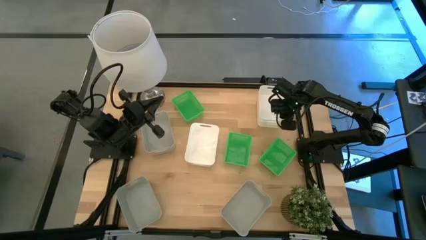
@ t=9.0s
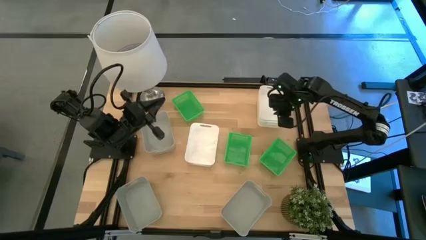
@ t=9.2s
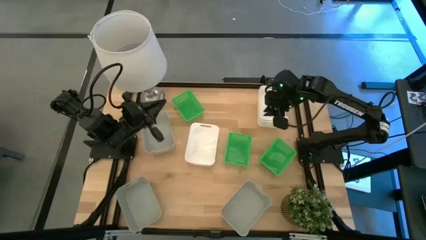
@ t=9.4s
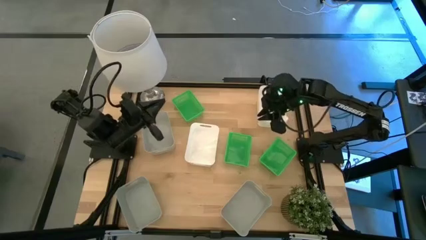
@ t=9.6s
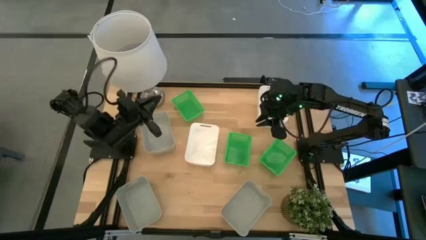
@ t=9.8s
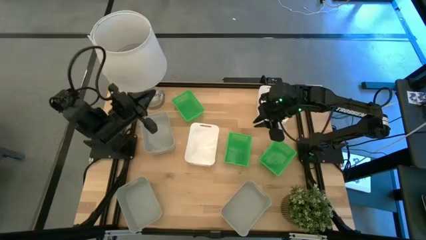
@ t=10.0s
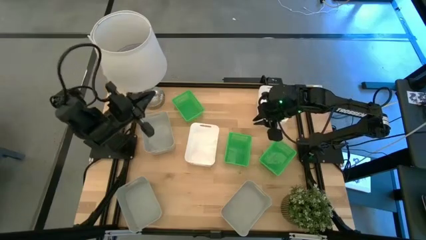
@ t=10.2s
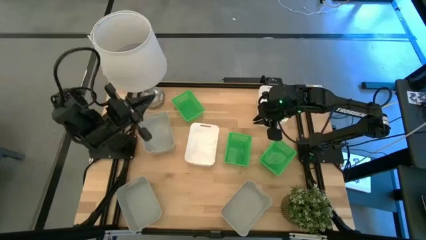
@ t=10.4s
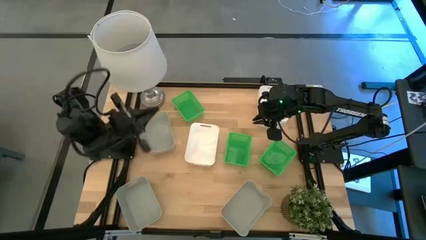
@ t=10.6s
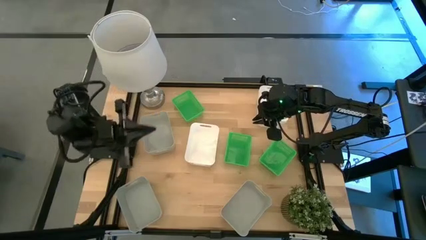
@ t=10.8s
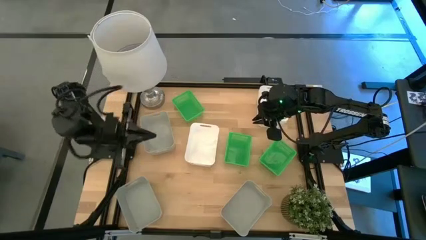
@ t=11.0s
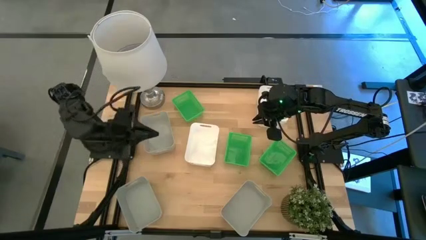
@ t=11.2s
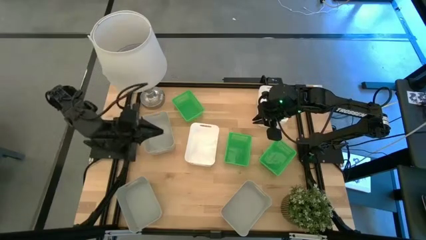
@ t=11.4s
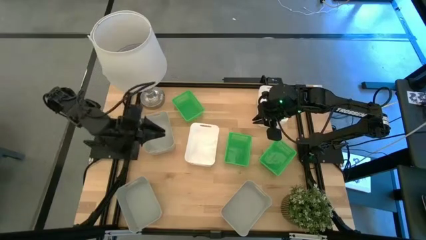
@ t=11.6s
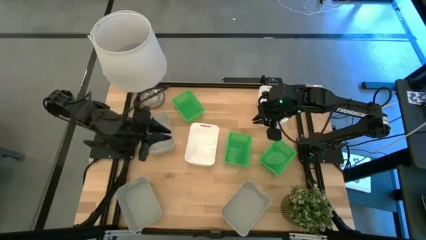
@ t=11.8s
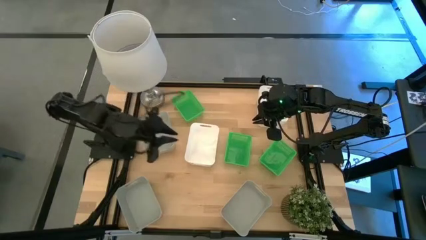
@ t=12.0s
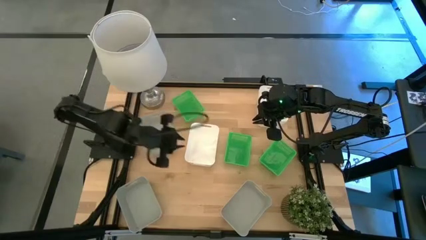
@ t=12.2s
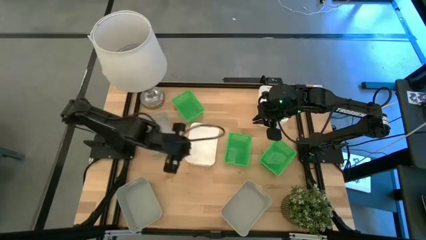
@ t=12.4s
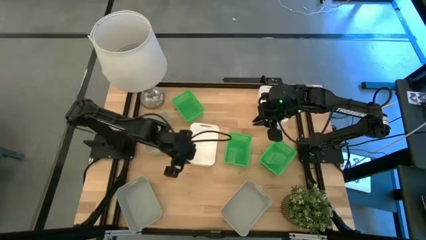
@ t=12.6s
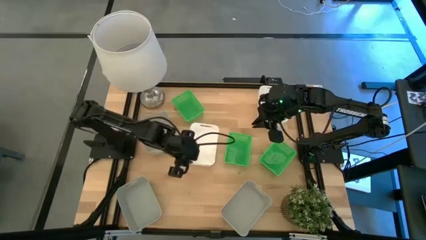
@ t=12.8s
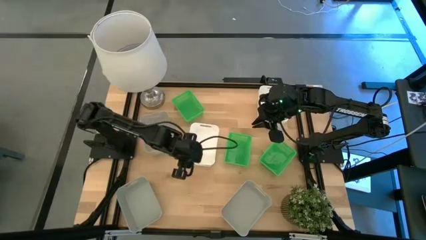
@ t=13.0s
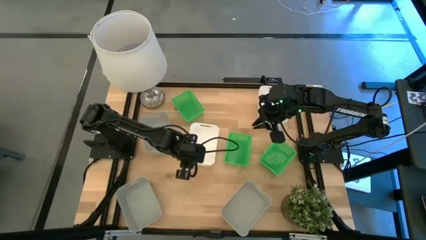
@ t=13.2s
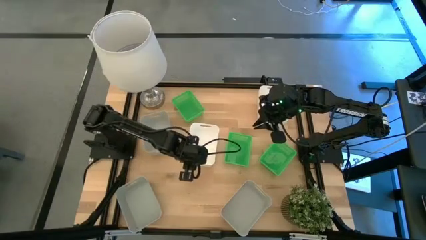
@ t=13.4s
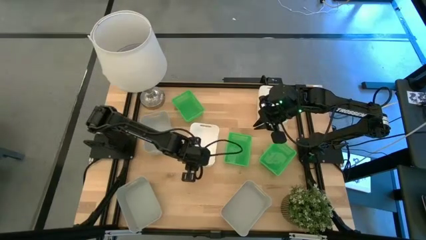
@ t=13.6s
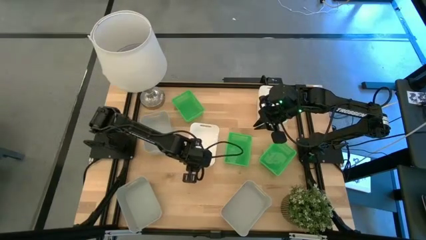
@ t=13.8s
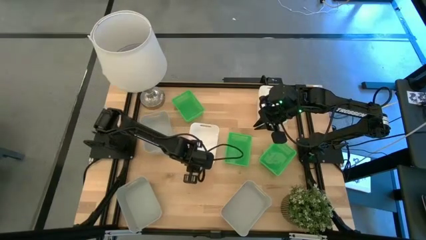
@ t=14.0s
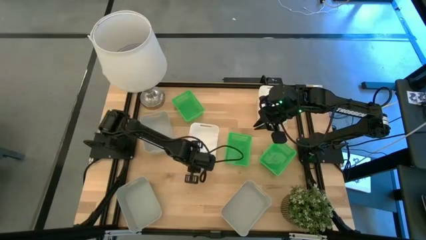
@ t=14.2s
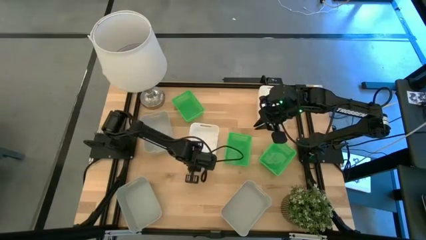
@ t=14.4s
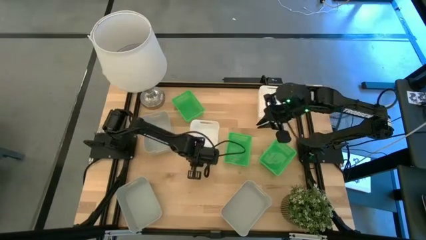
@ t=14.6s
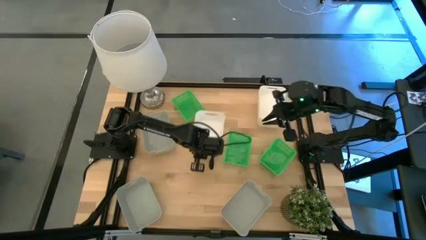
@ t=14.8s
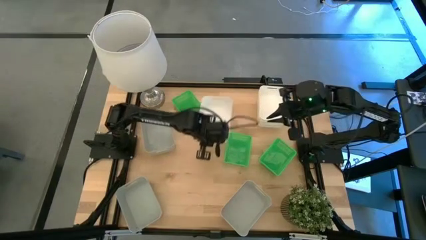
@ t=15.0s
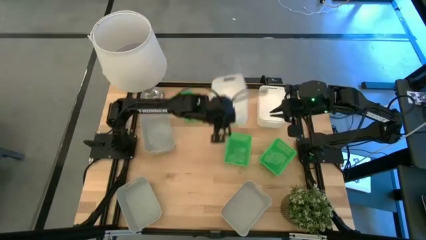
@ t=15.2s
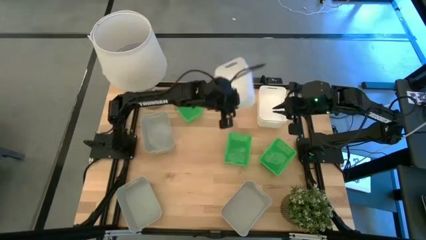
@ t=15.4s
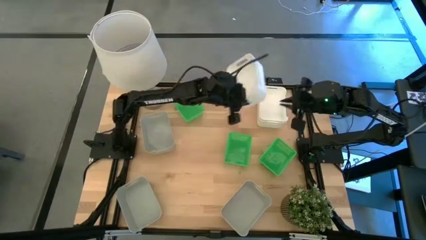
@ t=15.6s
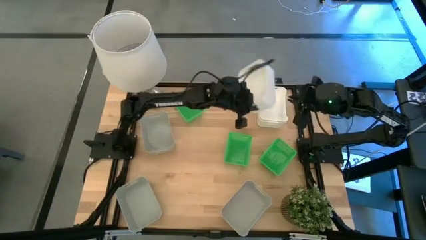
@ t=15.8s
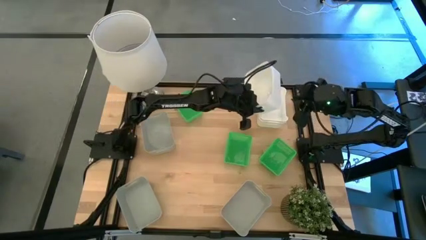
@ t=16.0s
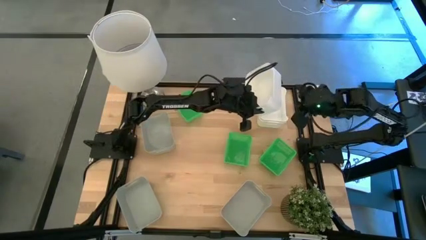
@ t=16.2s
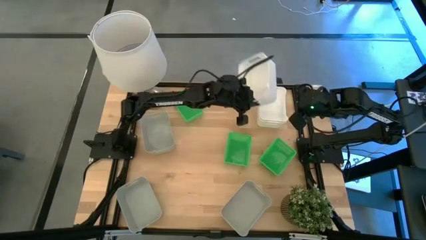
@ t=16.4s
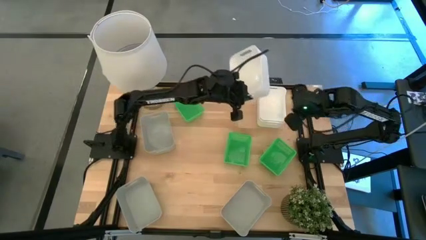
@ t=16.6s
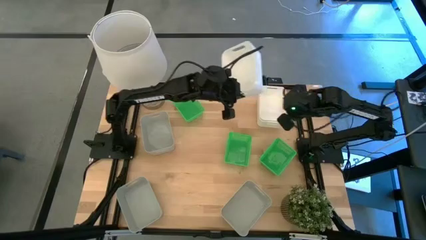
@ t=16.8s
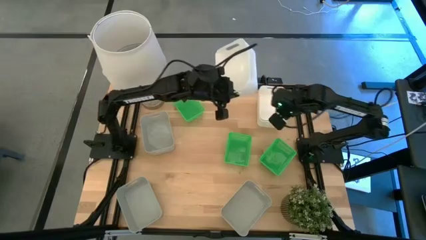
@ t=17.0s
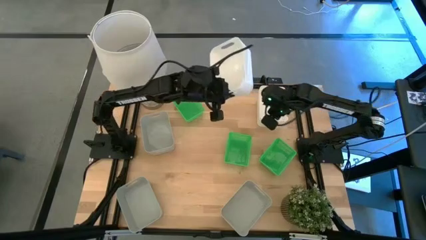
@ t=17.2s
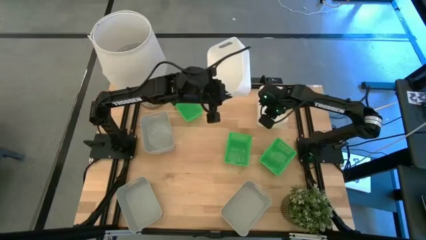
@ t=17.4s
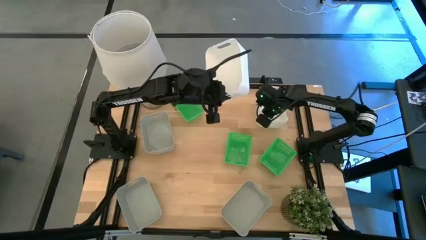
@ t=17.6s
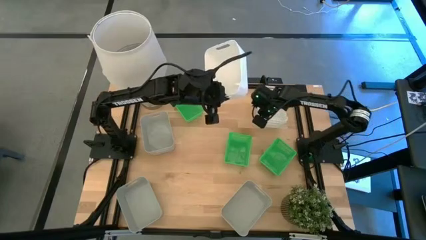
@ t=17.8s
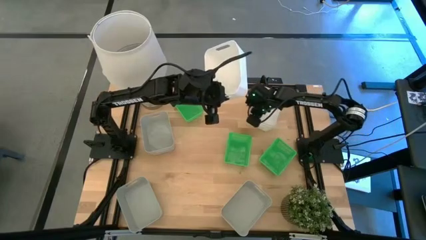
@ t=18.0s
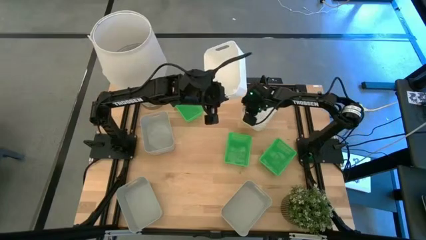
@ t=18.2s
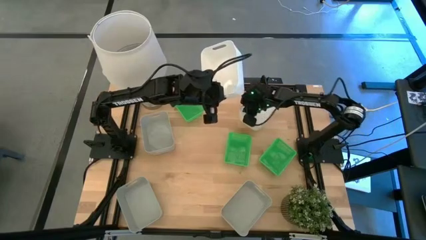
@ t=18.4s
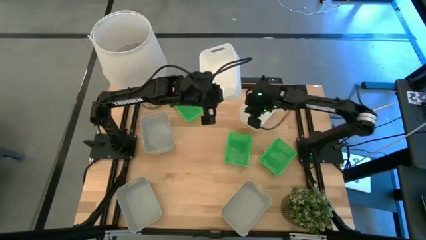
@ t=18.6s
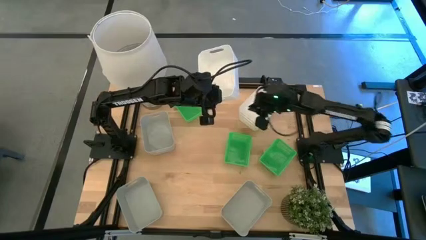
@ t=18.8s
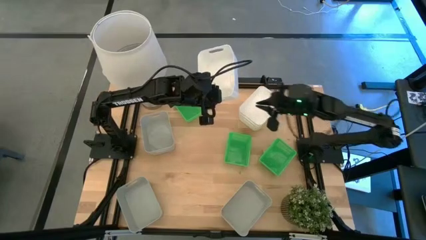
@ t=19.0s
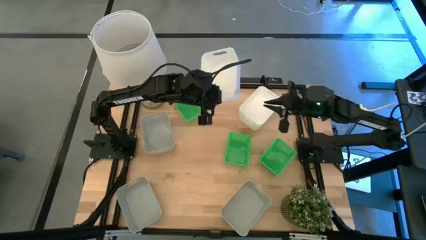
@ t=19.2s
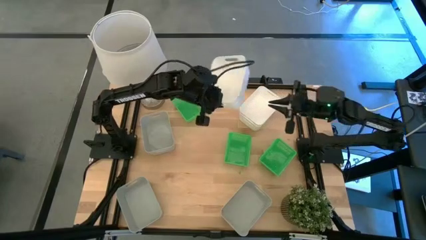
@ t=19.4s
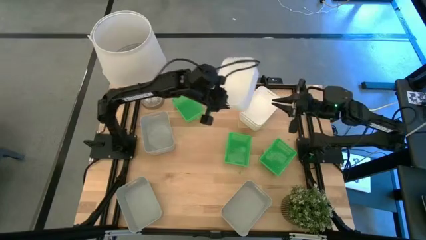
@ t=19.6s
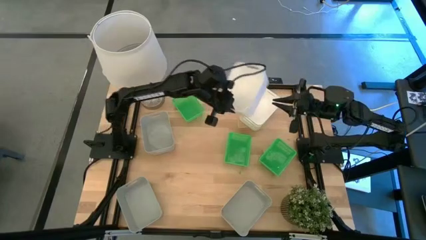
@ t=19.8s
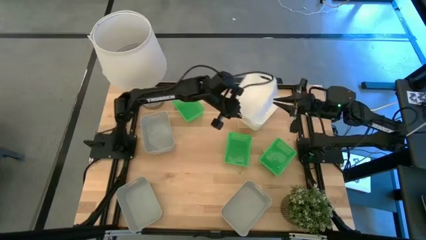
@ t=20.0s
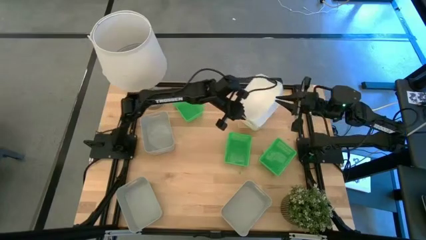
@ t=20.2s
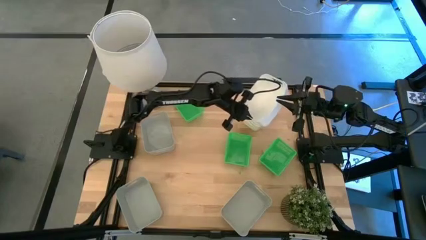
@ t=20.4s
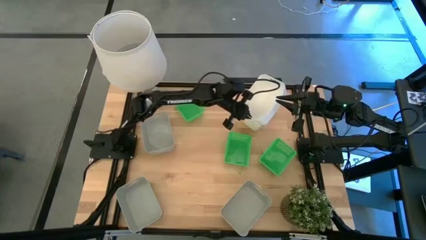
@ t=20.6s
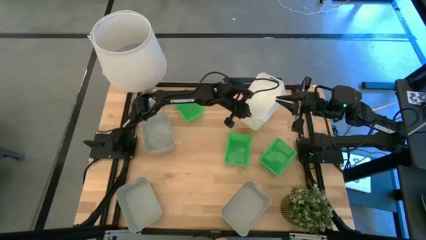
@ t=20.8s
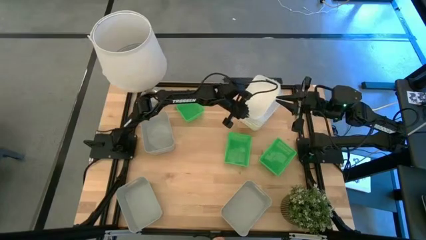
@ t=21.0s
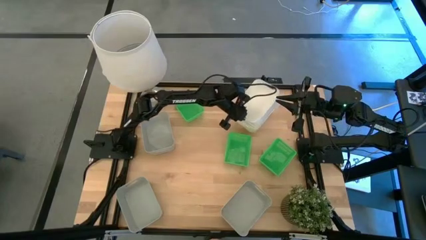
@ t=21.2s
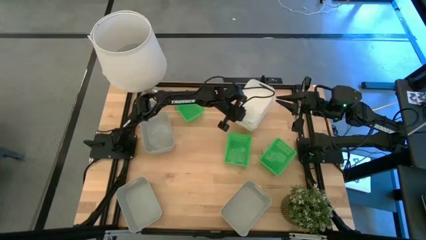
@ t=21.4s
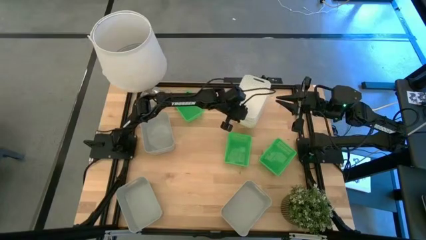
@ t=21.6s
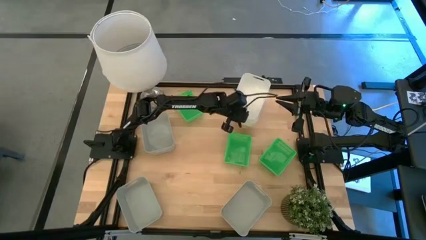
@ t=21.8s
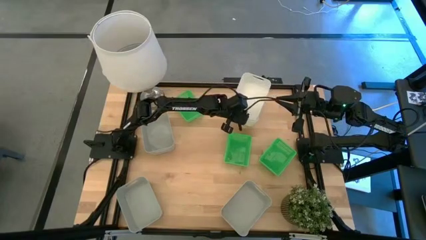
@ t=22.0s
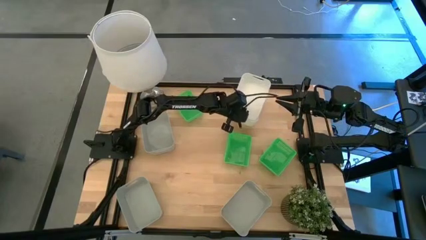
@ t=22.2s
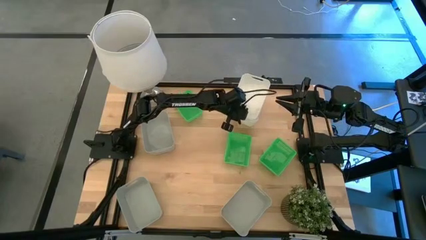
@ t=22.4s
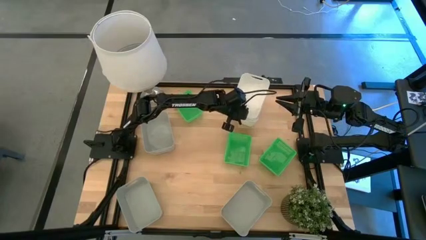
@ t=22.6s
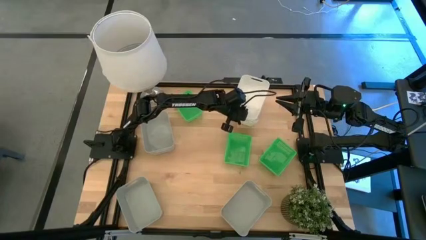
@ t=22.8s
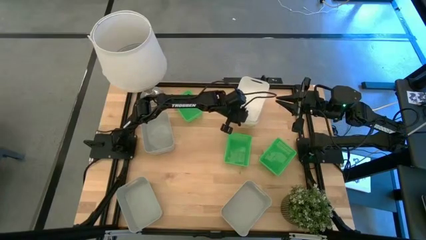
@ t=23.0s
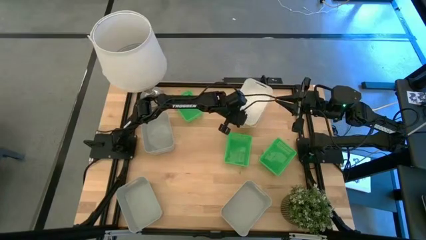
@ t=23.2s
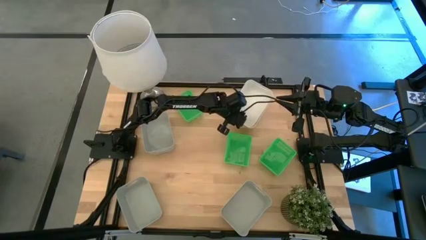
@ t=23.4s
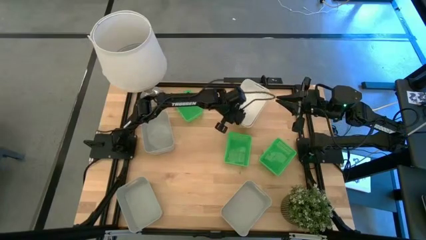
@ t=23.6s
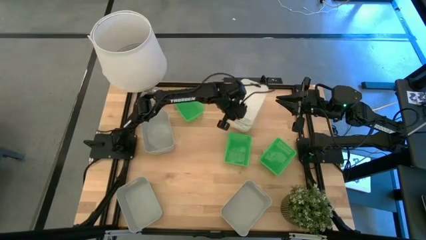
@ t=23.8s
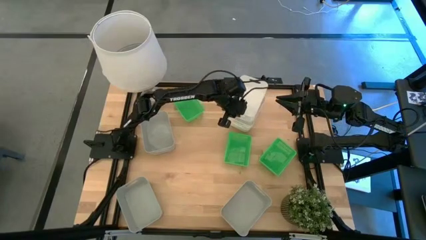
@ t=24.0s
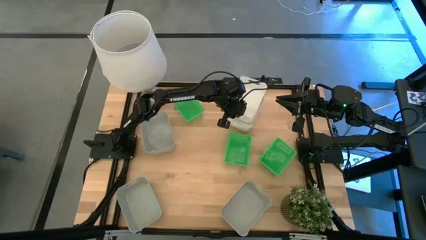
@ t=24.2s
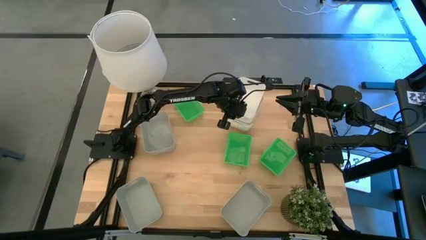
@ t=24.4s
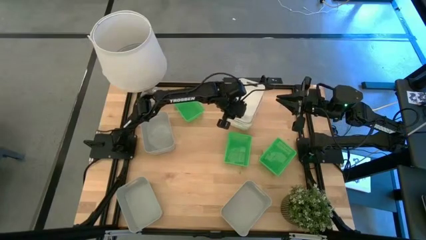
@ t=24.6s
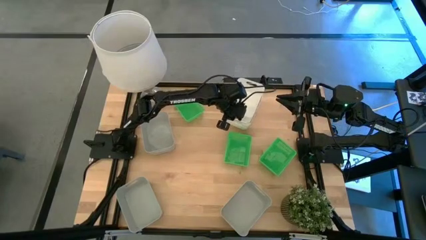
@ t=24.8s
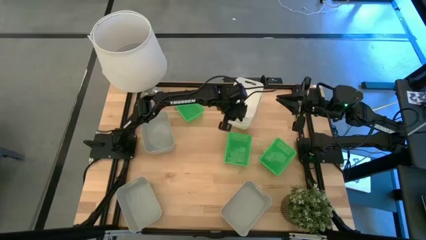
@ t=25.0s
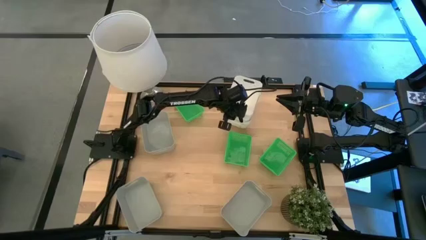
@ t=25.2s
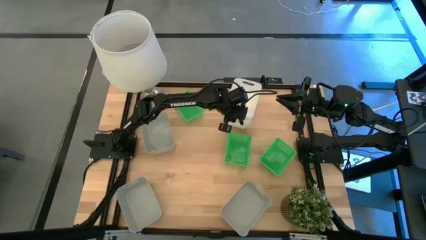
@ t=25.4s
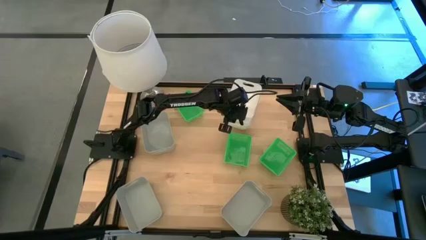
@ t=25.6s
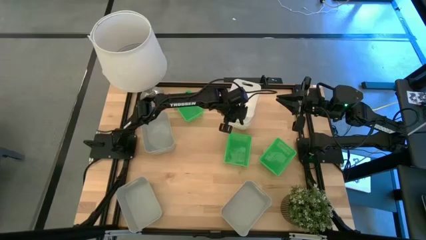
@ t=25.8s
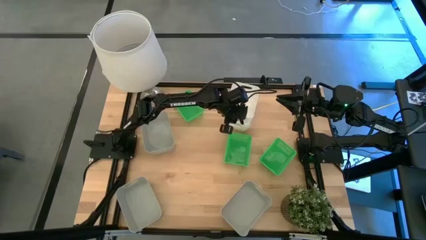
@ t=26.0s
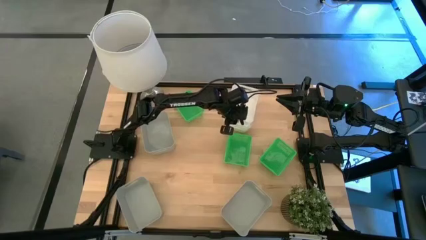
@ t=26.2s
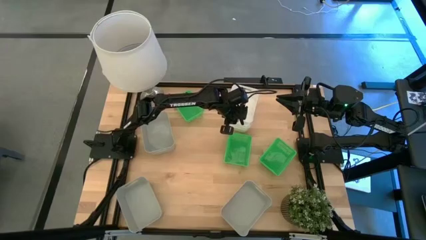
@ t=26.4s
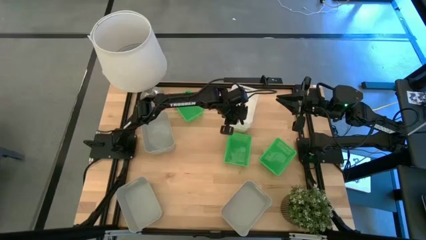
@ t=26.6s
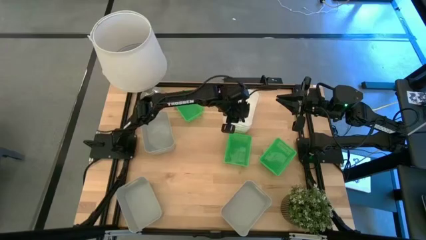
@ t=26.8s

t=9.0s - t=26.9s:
Stack the bottom white bin on top of the top white bin
